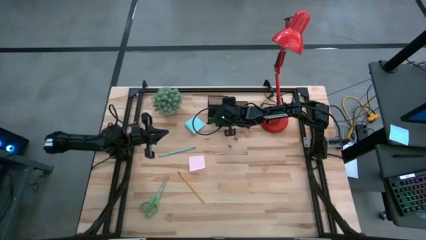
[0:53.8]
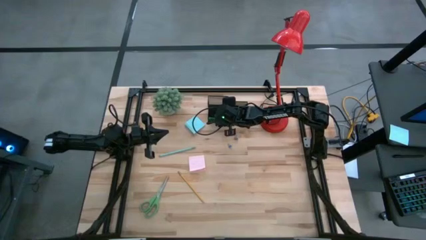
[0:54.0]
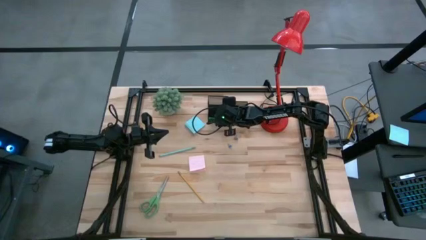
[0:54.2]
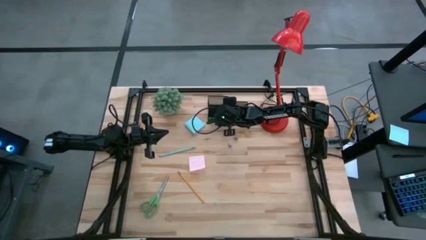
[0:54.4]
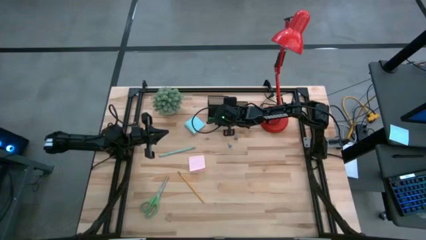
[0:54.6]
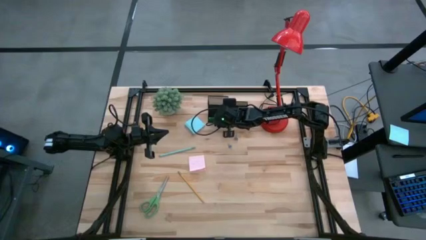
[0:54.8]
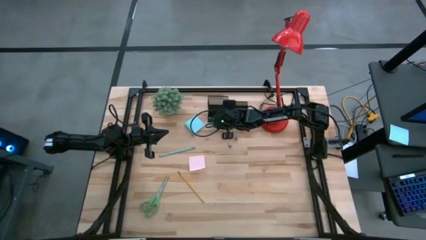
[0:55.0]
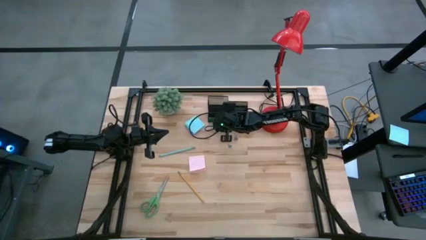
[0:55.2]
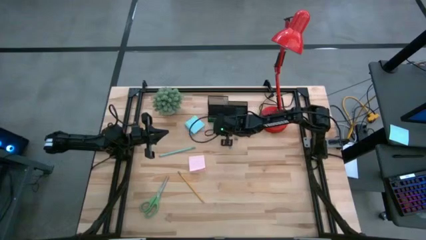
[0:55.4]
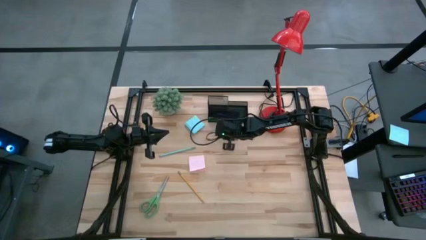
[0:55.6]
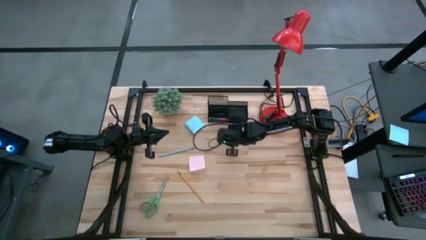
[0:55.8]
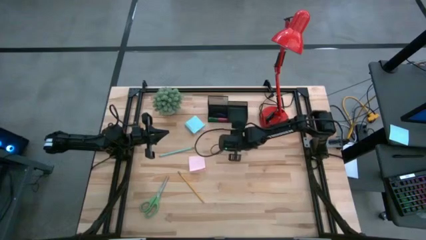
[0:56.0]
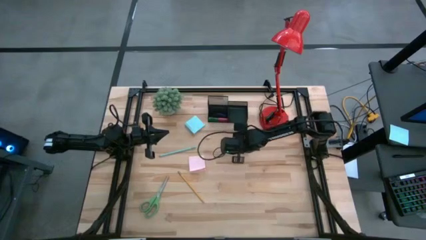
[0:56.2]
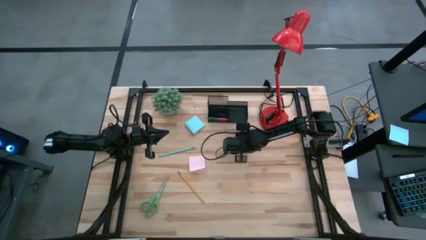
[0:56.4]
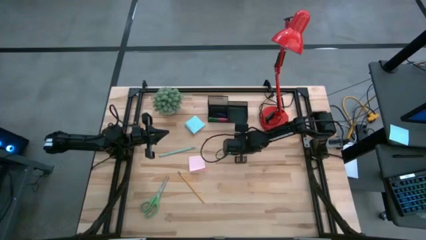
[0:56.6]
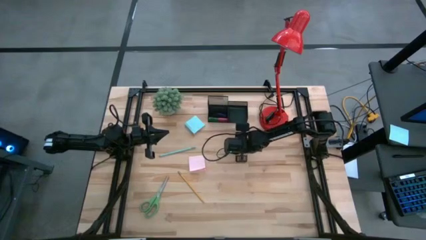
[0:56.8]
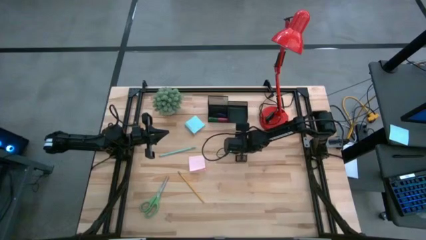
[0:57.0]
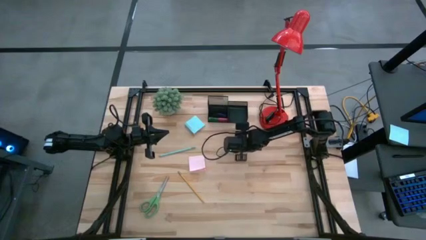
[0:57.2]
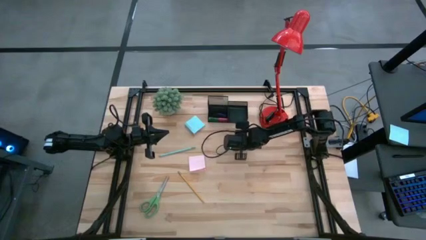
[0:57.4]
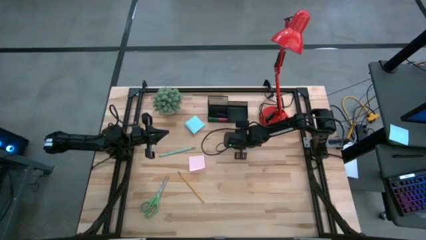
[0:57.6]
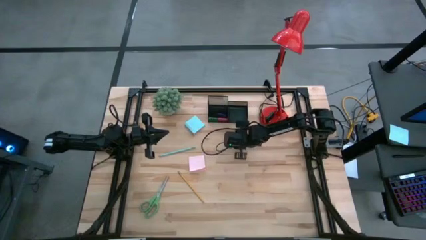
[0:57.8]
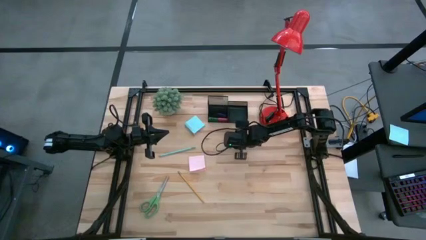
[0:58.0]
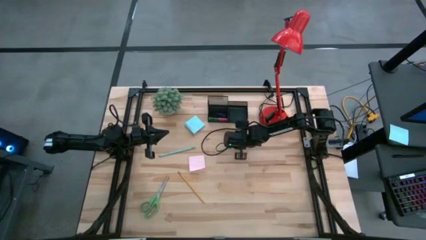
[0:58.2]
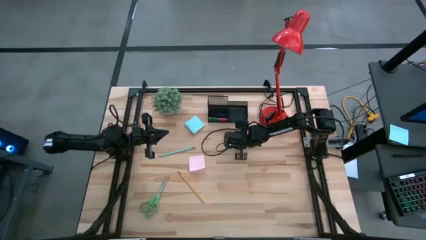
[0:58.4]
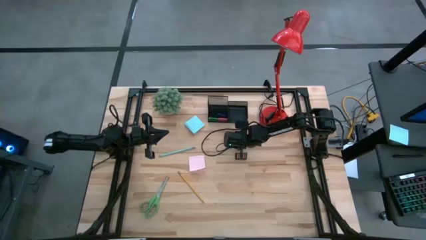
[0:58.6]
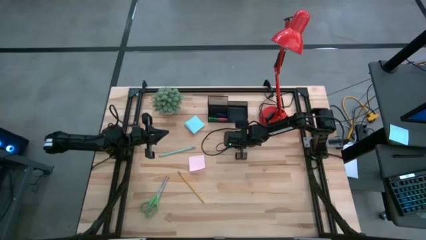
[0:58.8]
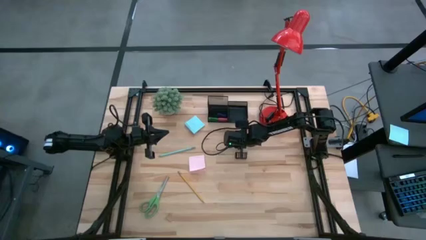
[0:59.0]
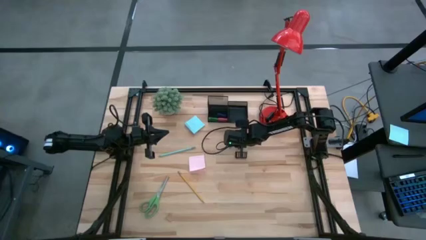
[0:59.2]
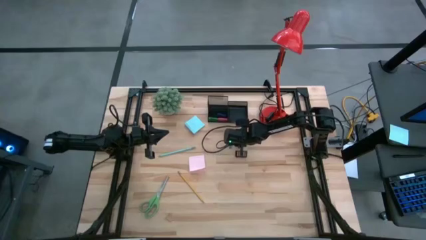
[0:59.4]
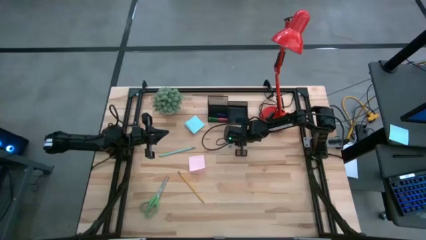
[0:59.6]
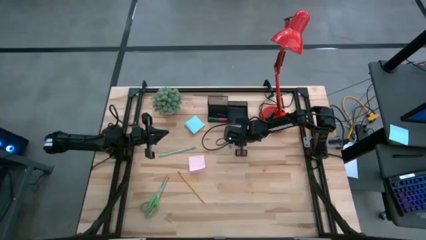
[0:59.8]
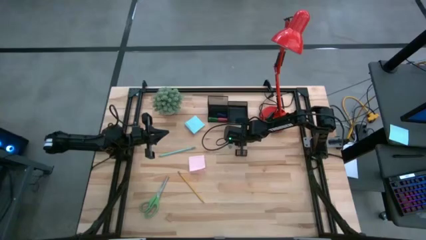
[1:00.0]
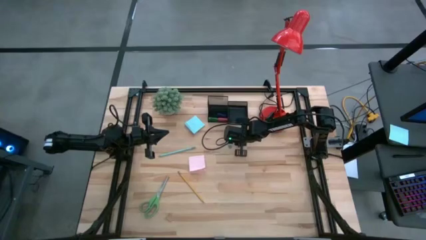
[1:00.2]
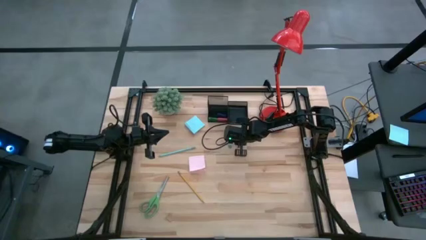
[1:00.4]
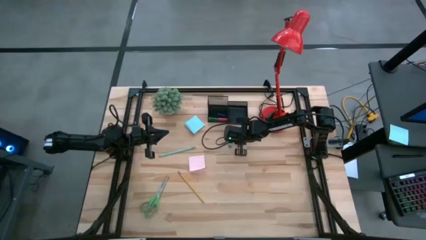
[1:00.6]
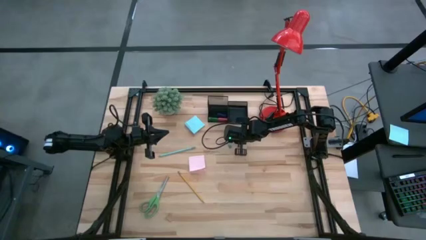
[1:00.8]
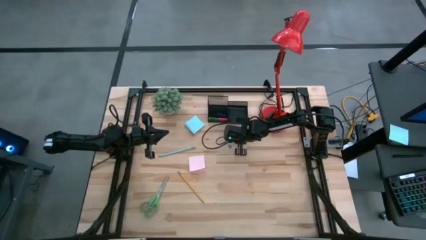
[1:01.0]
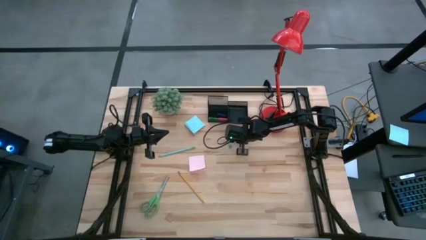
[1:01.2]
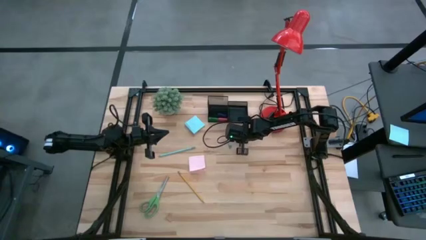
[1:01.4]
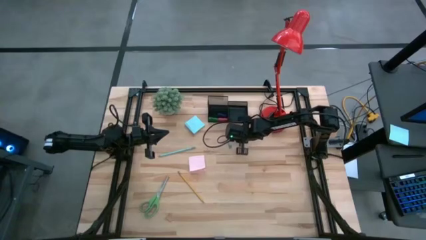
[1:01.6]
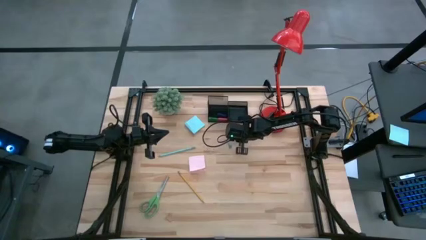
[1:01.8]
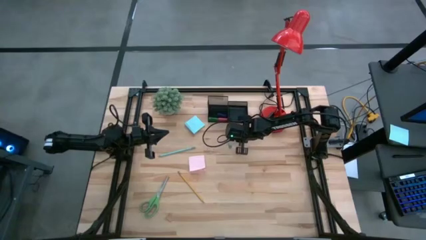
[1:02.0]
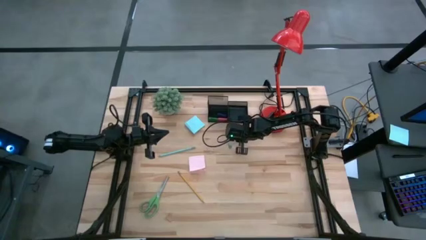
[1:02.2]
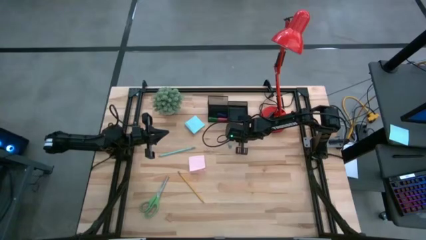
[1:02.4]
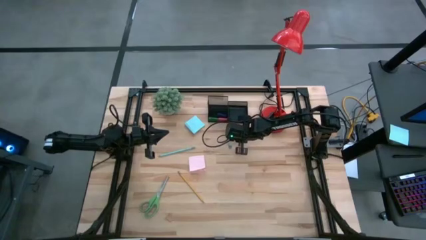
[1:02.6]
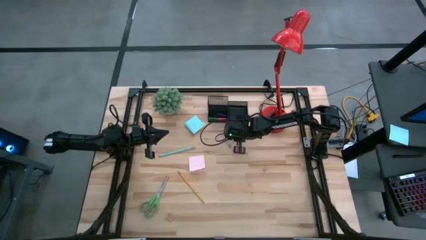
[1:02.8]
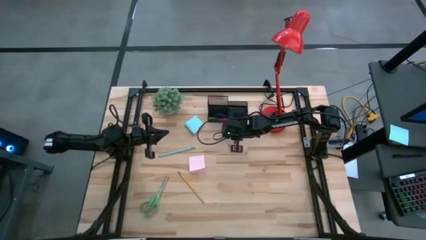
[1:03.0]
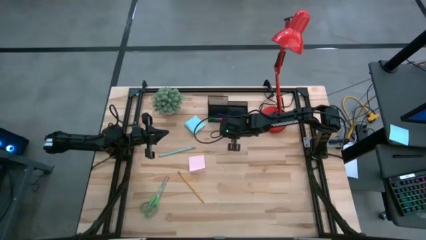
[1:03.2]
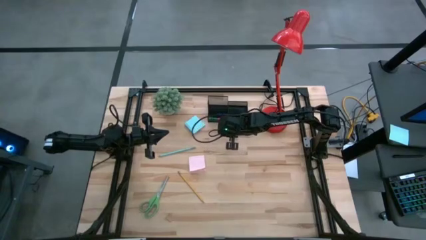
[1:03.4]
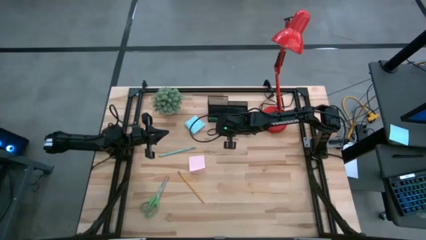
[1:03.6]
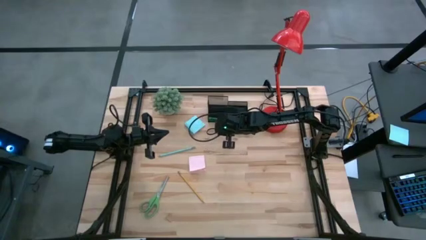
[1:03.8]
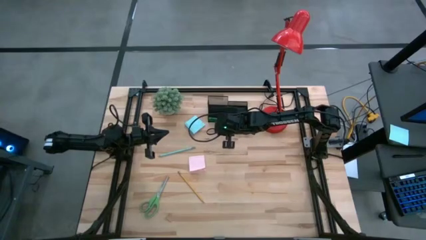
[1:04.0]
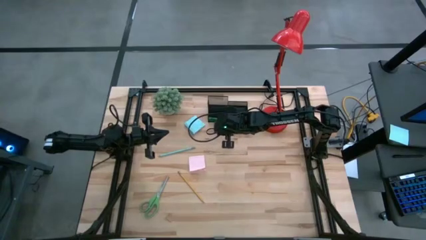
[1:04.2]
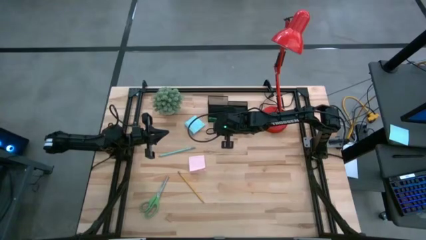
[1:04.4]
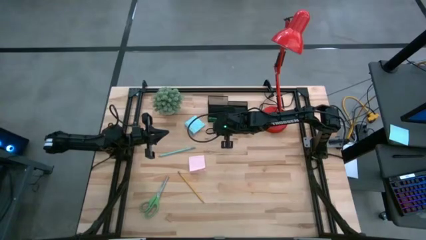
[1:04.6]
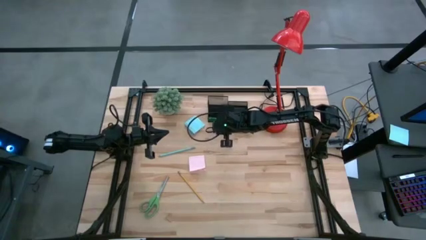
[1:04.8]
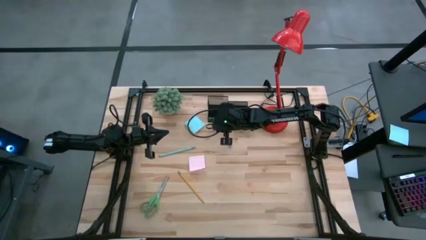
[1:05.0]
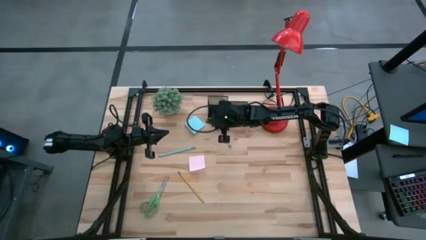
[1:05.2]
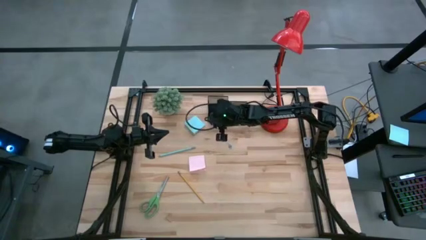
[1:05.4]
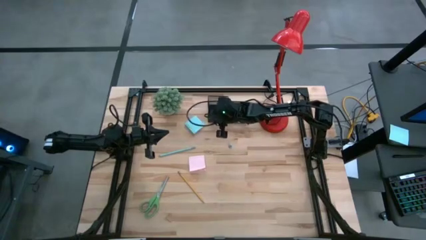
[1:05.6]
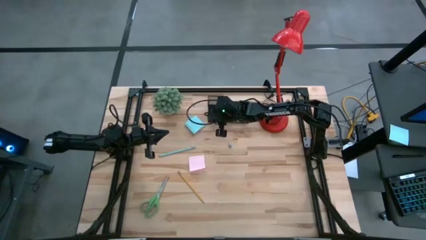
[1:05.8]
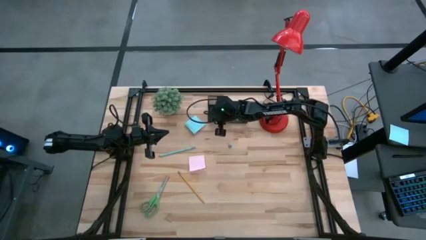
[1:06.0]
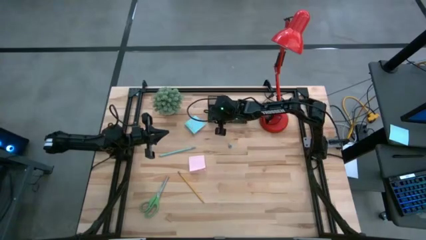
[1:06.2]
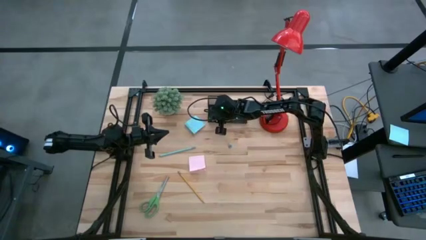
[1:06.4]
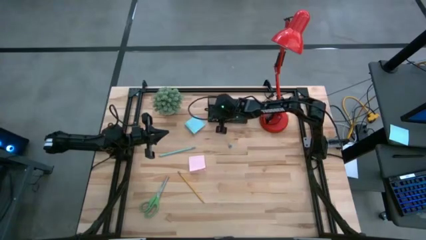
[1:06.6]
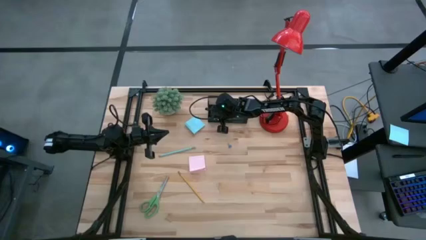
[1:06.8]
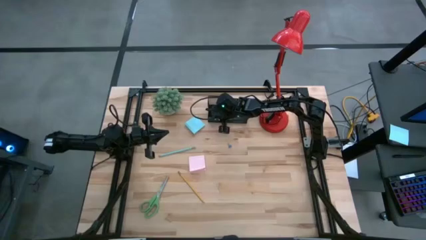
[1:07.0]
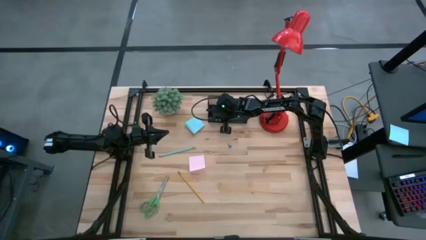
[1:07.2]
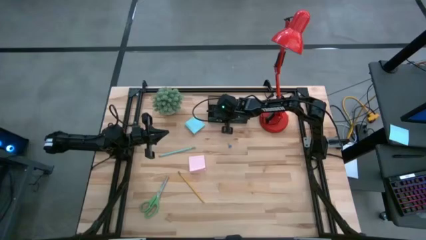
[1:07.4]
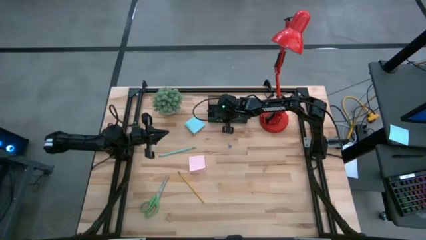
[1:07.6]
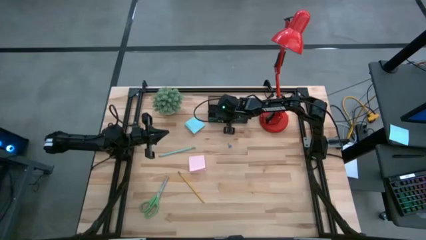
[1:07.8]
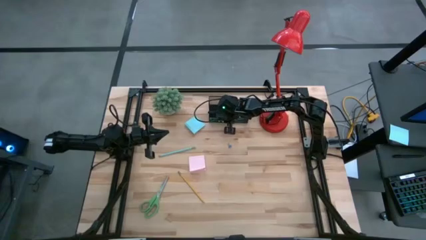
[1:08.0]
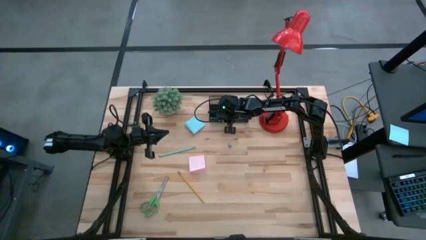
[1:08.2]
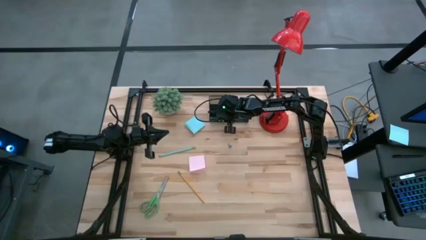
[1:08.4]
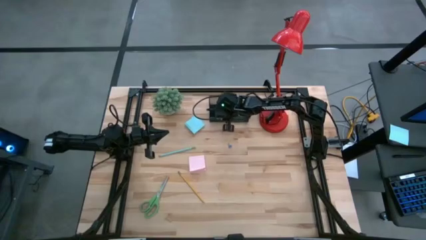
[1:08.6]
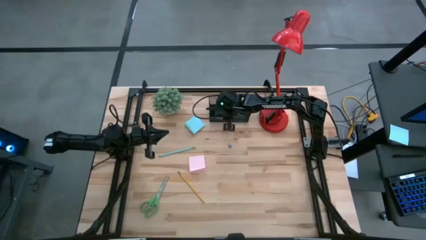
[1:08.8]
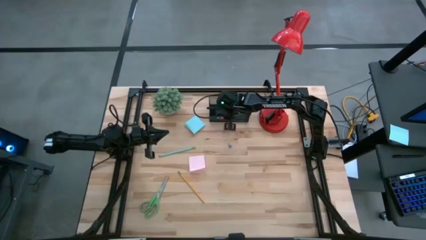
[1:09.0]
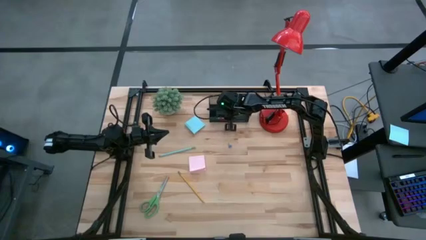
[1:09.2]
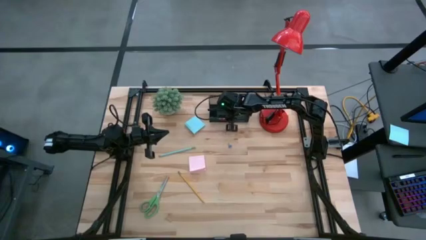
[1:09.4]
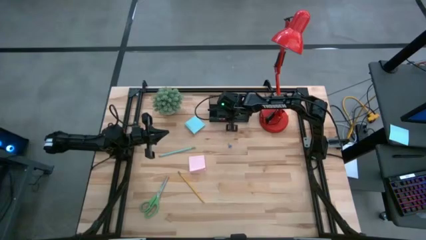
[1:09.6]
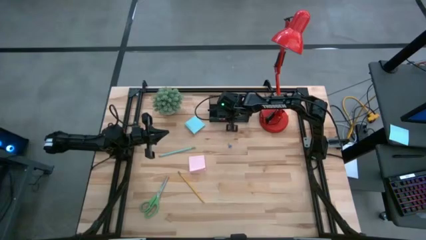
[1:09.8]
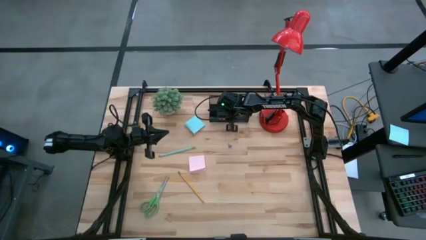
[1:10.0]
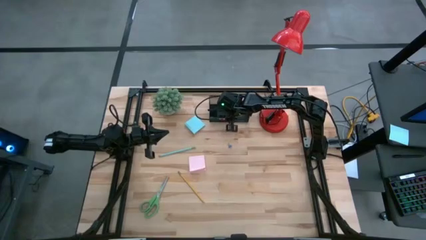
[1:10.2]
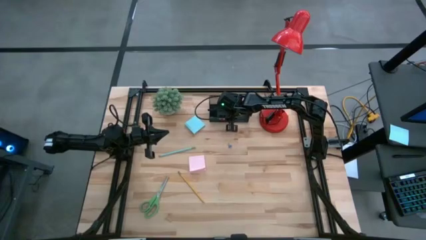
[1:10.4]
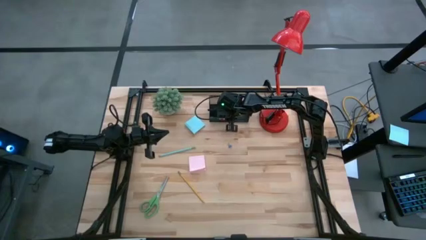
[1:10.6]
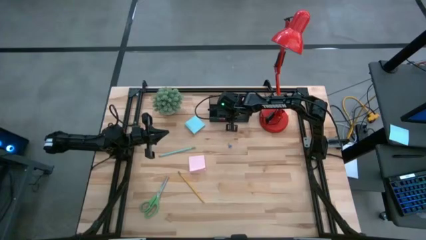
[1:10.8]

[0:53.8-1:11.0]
Task: Pick and place office supplies into organizer
Put the top light blue binder clip into the desk organizer
